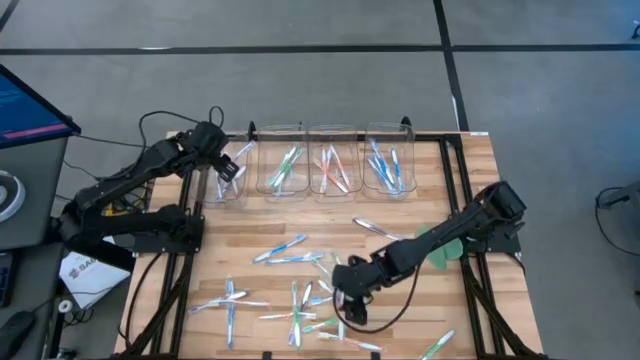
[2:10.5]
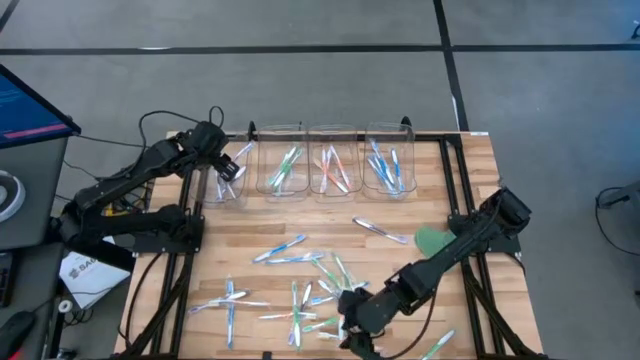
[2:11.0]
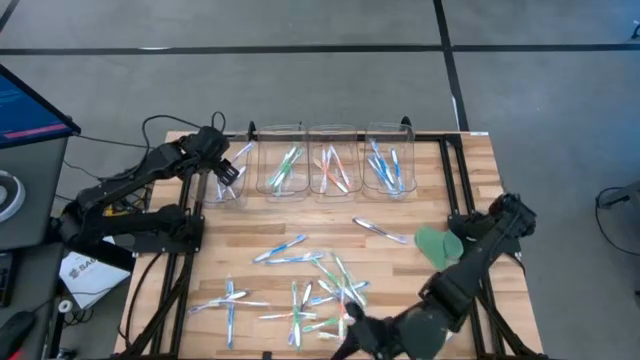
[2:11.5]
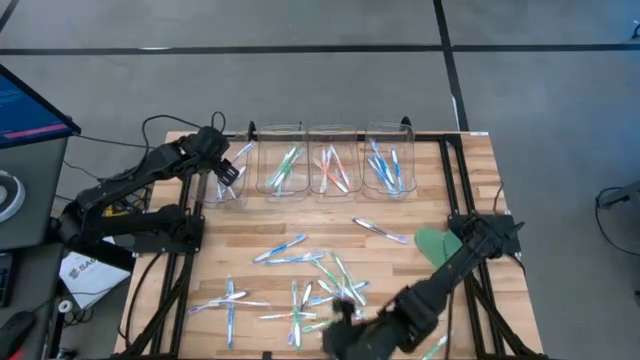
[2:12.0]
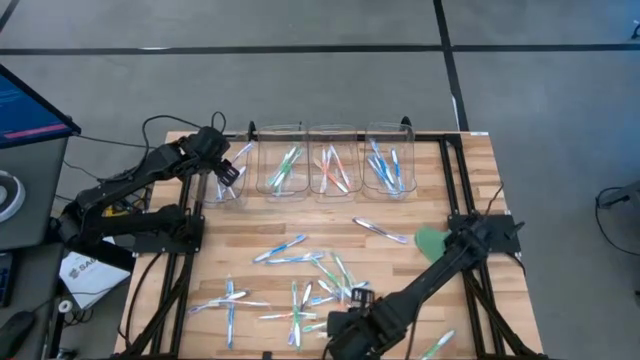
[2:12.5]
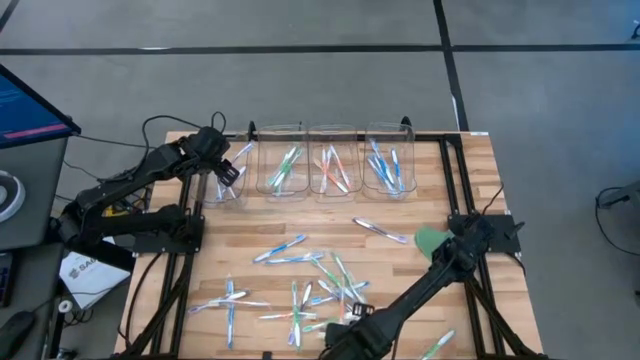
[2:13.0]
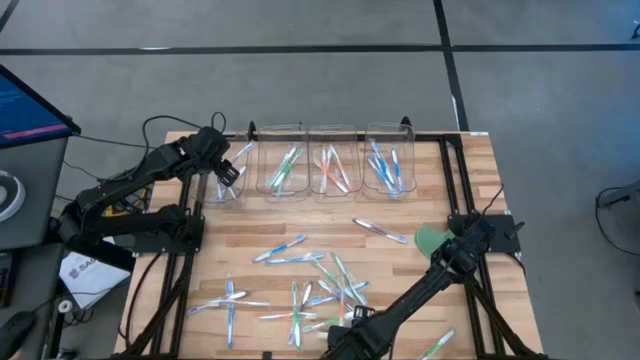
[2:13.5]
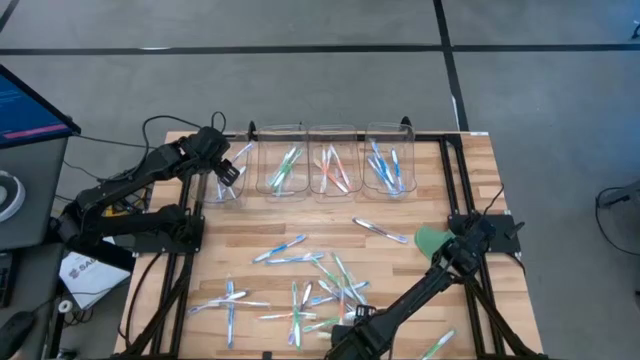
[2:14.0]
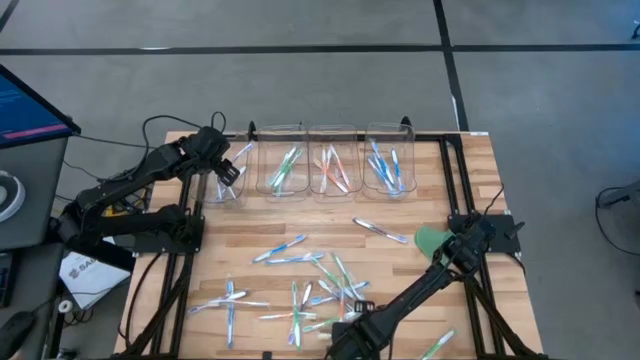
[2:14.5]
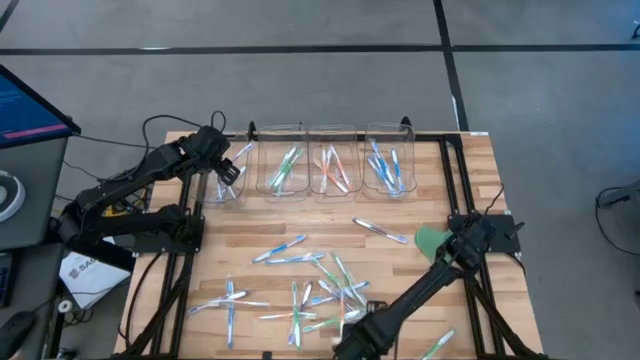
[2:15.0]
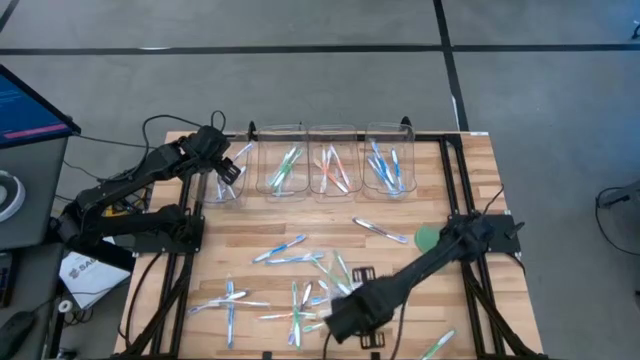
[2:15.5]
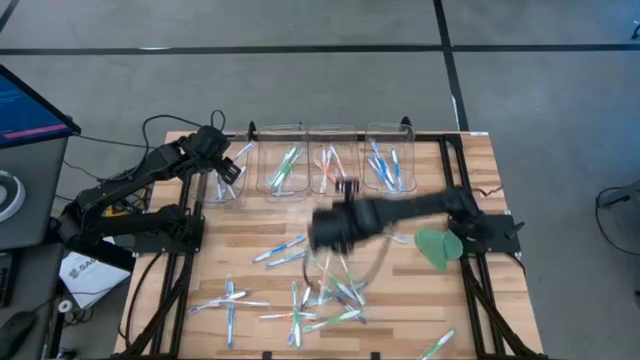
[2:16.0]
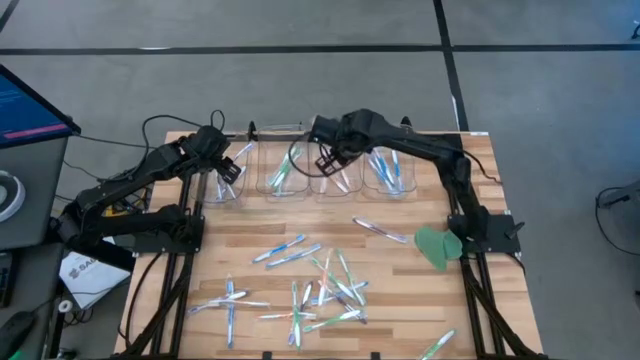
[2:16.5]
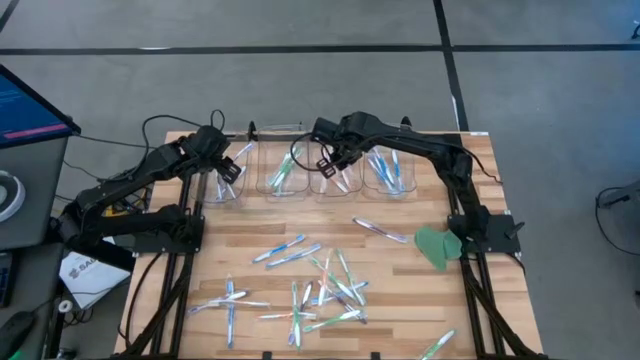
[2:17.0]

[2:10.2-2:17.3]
Task: Pick & Place Toothbrushes
Put the orange toothbrush into the middle right transparent bin

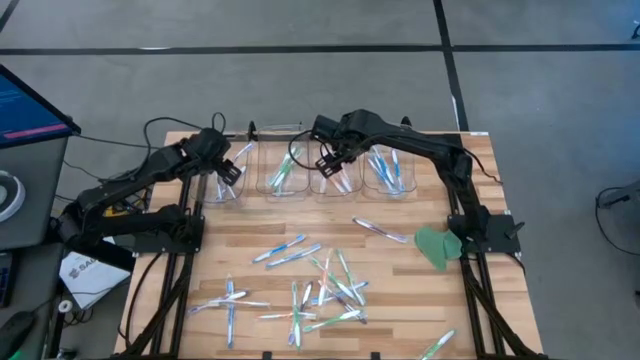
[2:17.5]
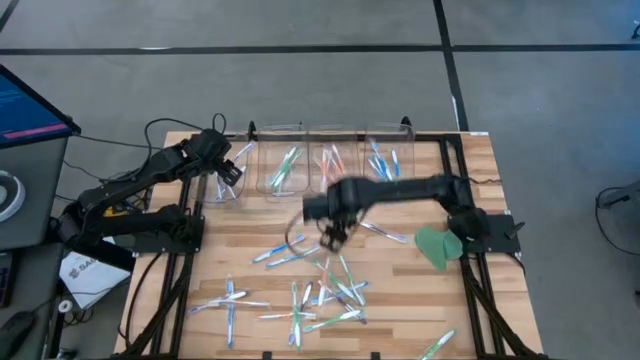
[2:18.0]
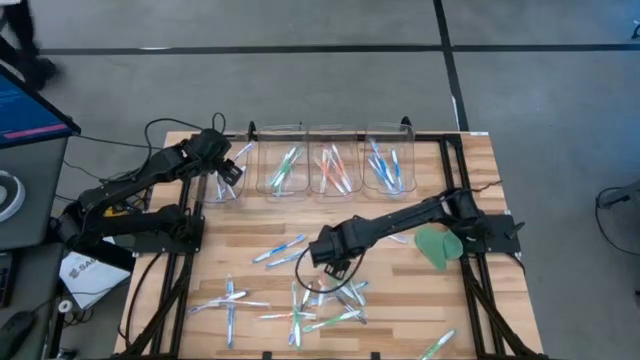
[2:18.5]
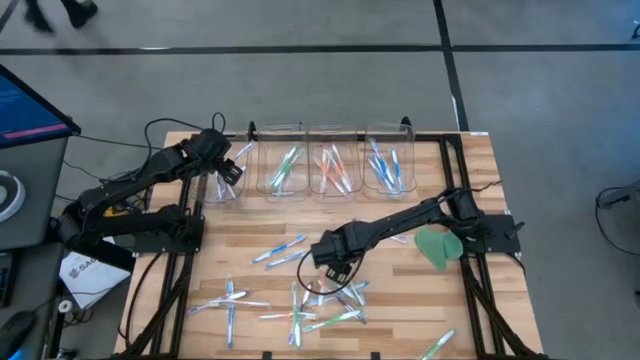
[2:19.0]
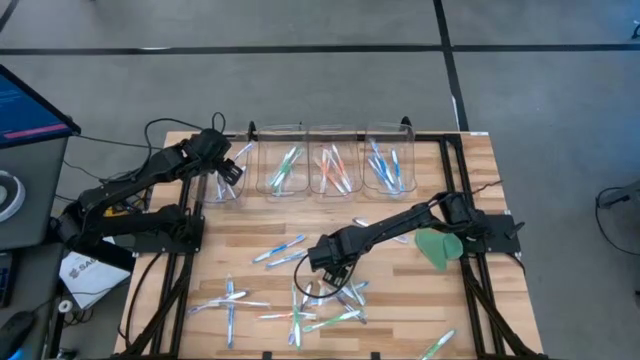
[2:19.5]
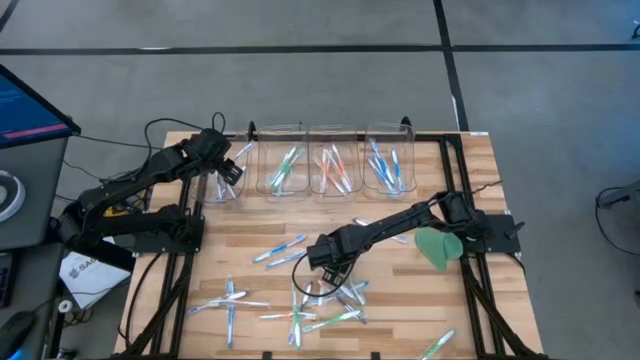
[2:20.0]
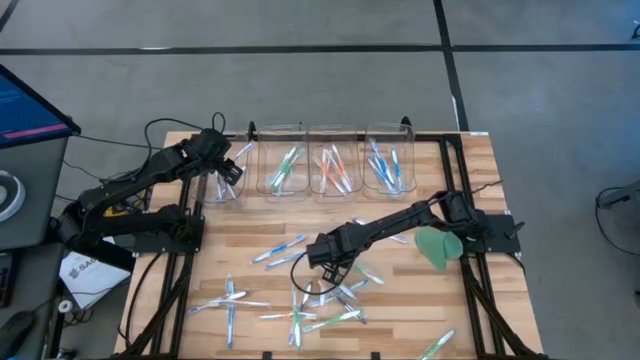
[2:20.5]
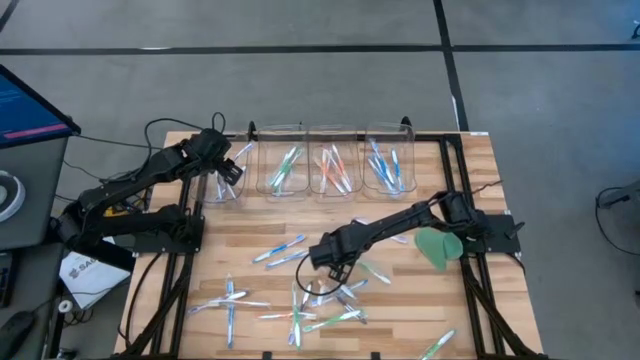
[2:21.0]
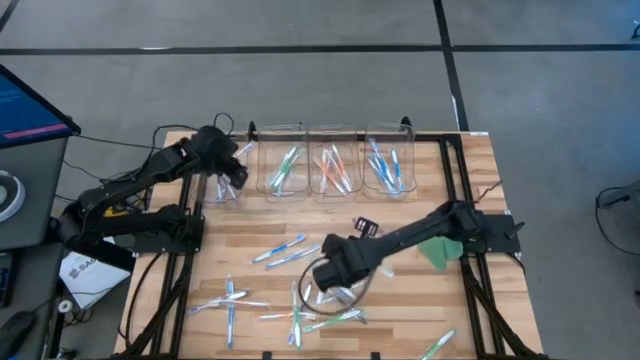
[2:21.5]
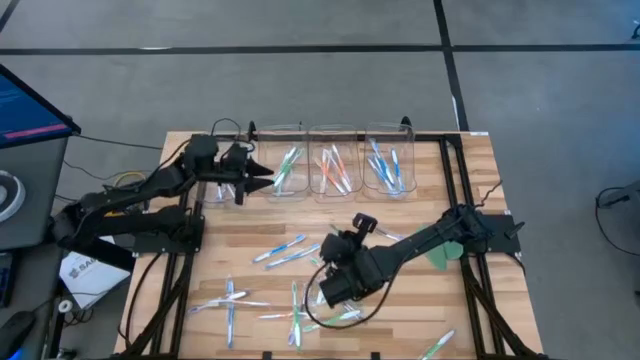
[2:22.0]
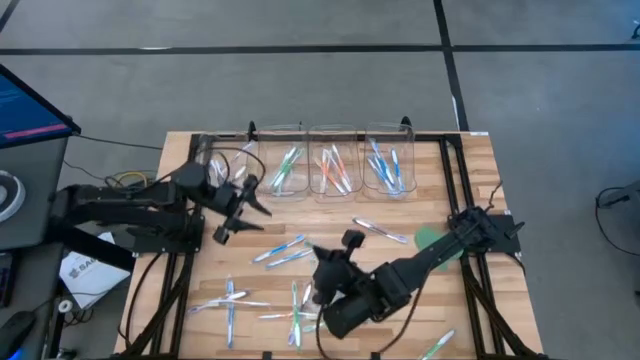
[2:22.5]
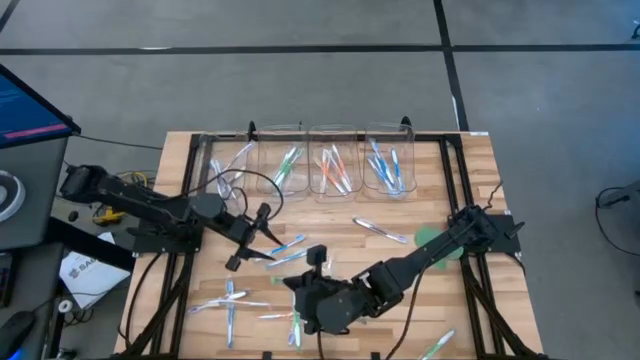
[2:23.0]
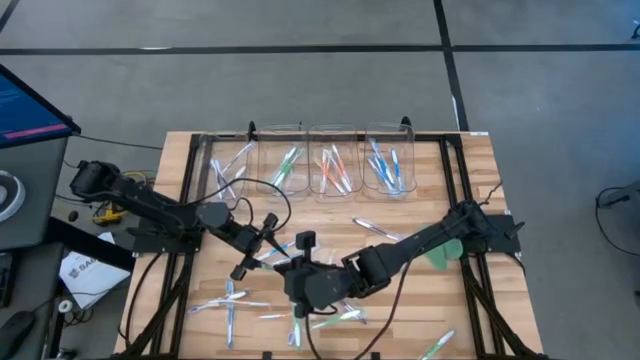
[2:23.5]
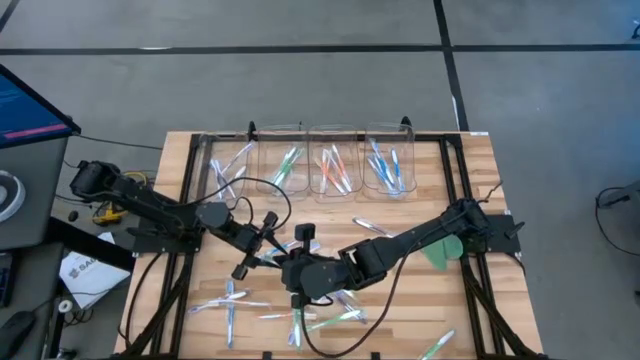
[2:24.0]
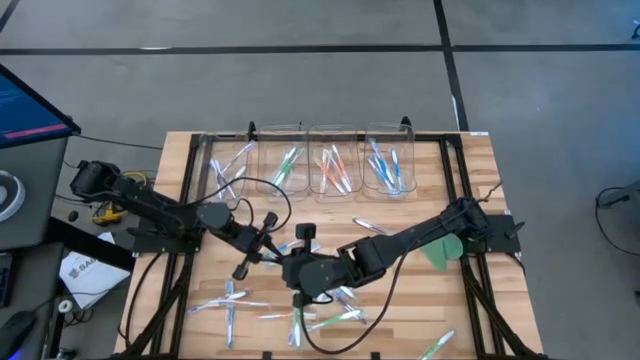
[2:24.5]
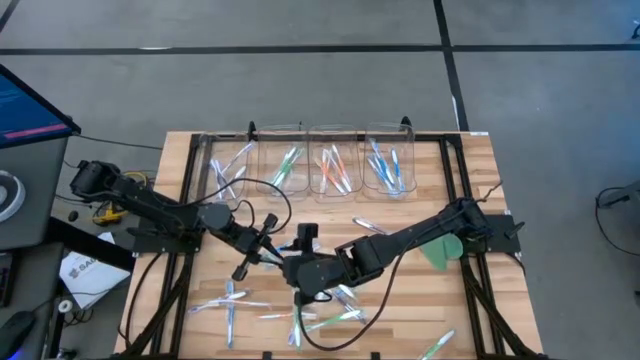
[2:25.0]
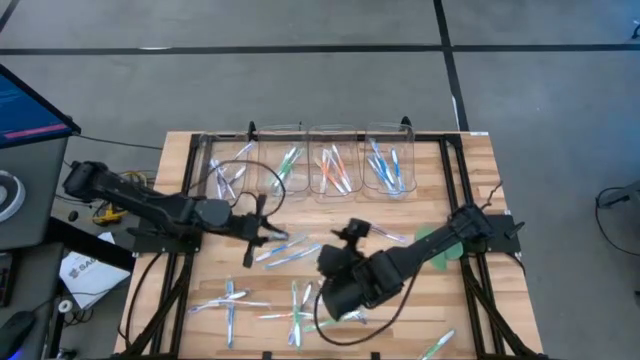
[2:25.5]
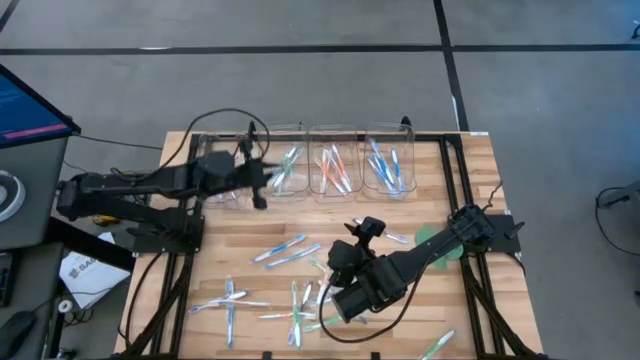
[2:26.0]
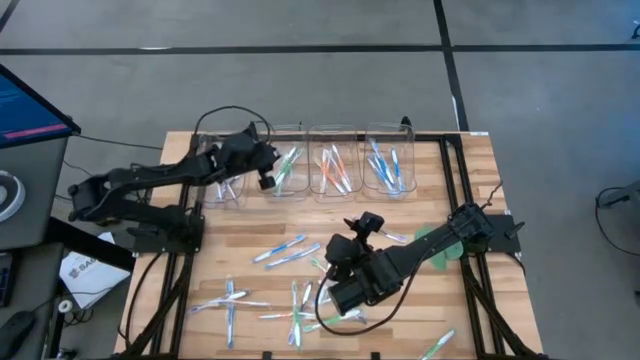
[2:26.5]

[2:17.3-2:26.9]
Put the green toothbrush into the middle left transparent bin

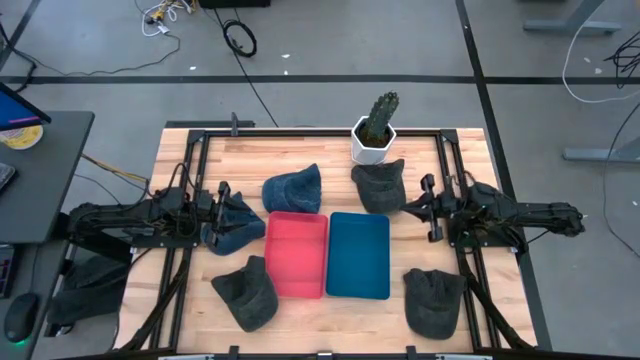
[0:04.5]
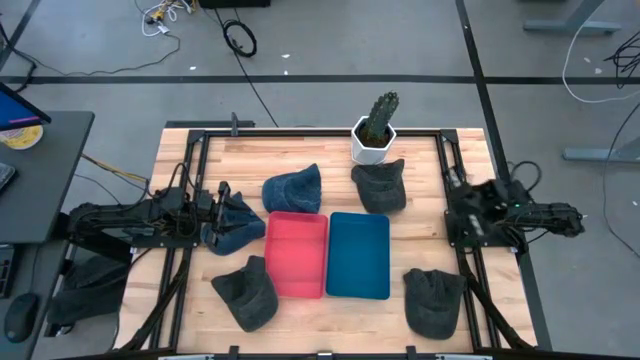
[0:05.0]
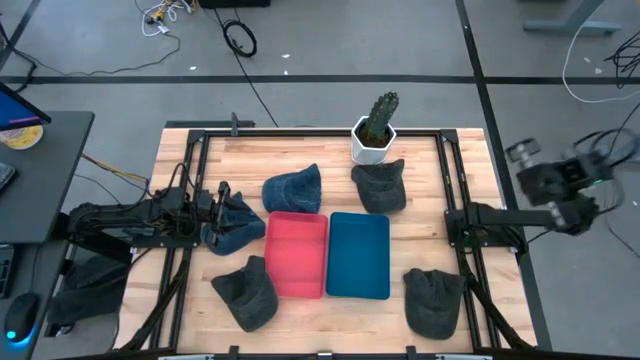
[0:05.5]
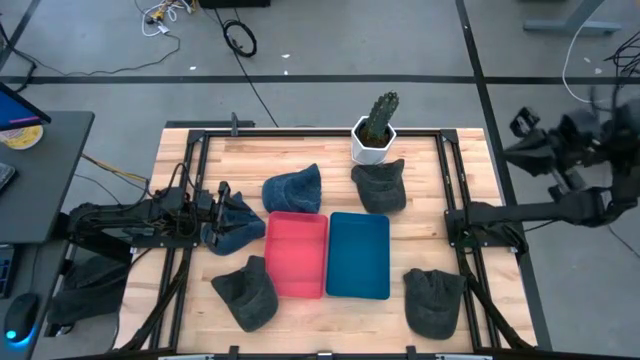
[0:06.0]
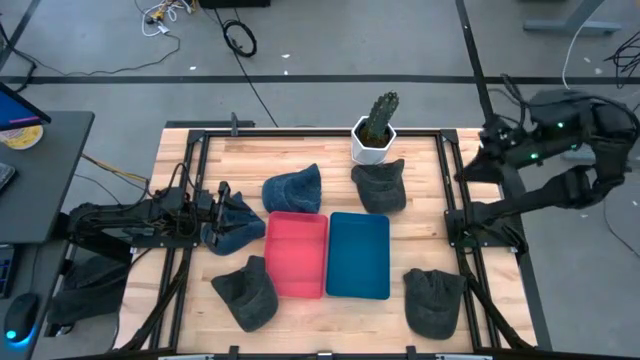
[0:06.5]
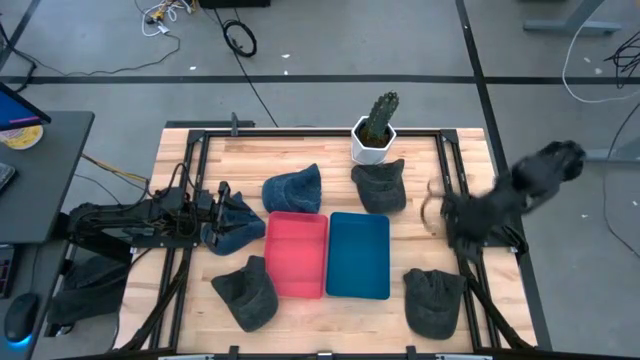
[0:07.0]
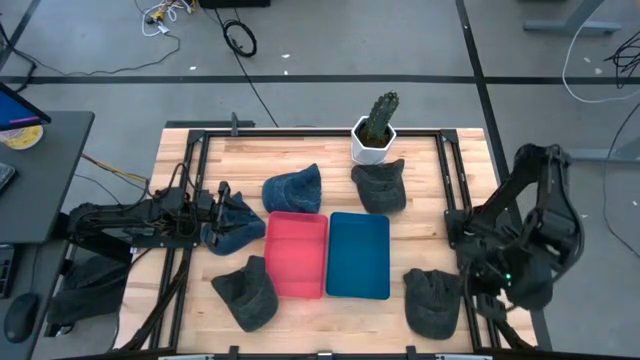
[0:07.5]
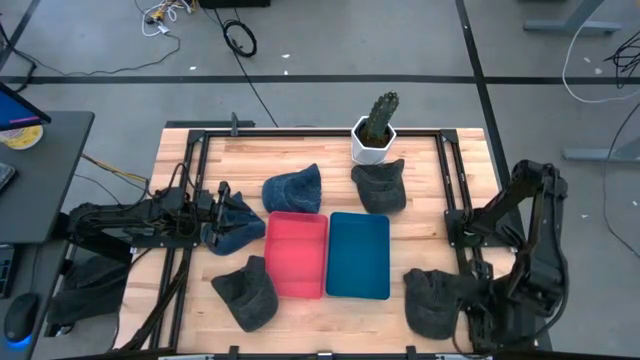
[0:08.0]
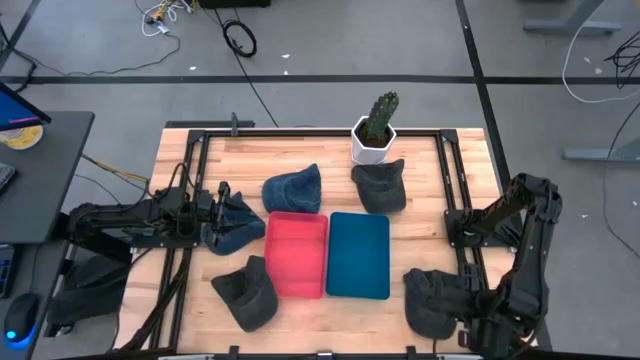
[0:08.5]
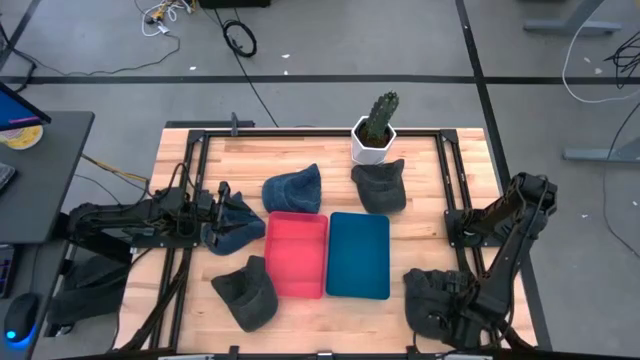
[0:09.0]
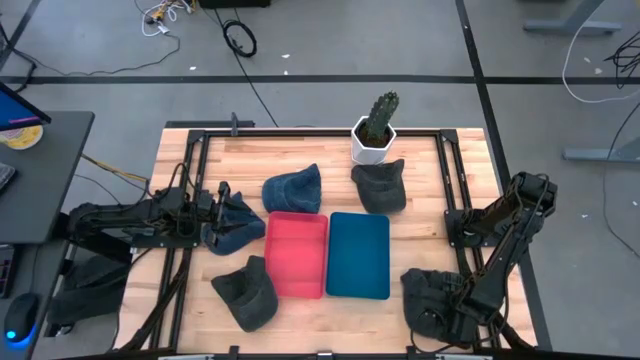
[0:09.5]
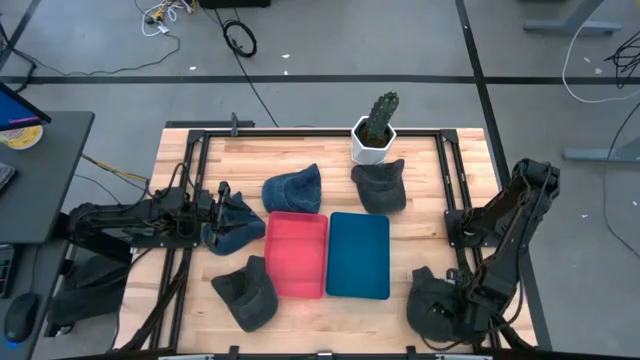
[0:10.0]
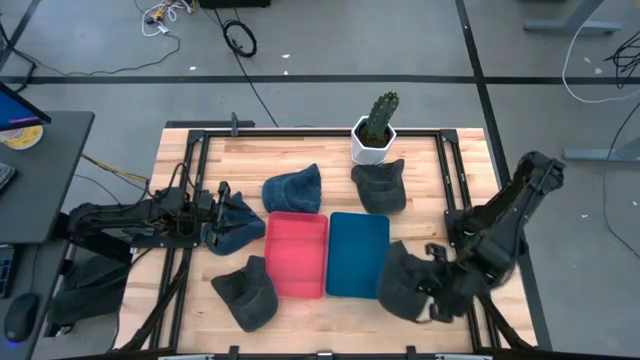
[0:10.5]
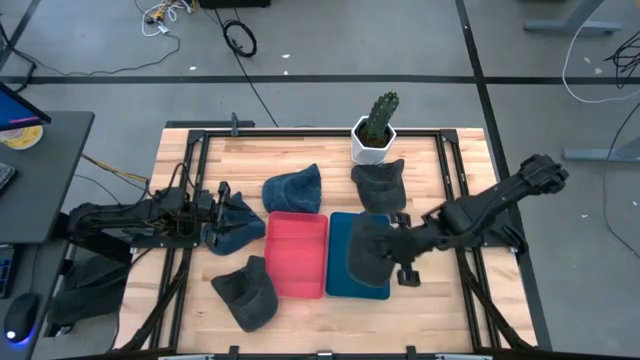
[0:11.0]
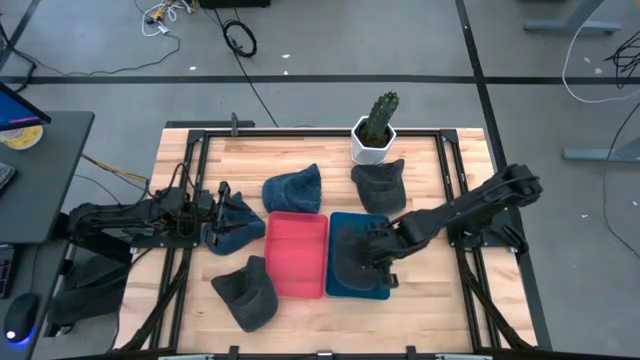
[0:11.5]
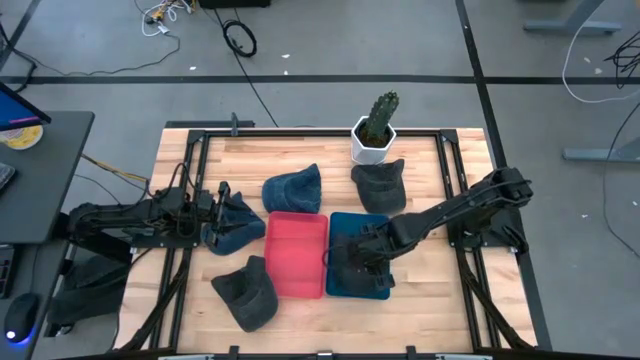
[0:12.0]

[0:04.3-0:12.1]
Task: Pick & Place hat
Put the bottom right black cap in the blue bin
